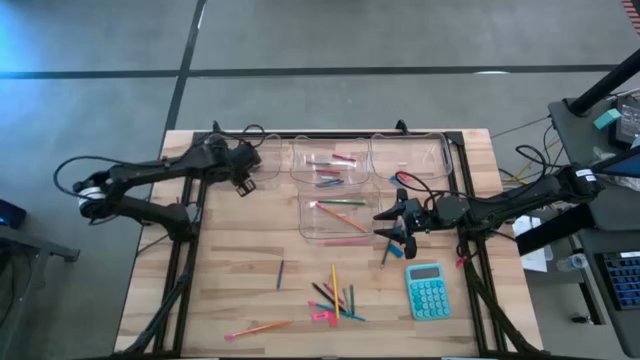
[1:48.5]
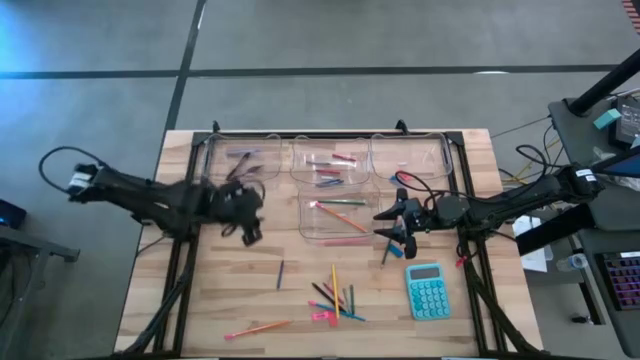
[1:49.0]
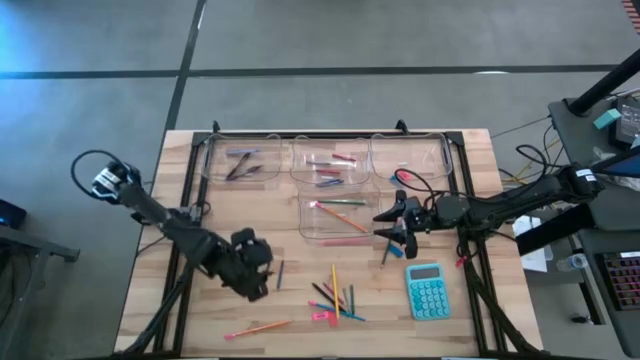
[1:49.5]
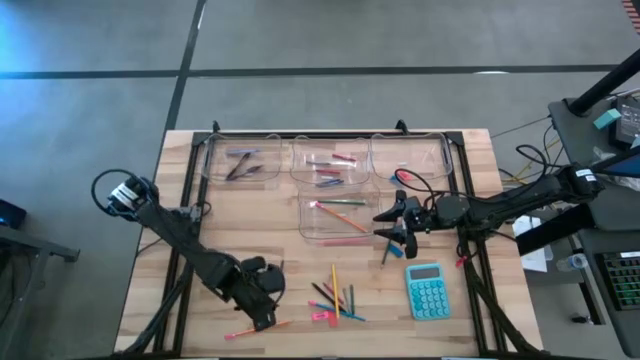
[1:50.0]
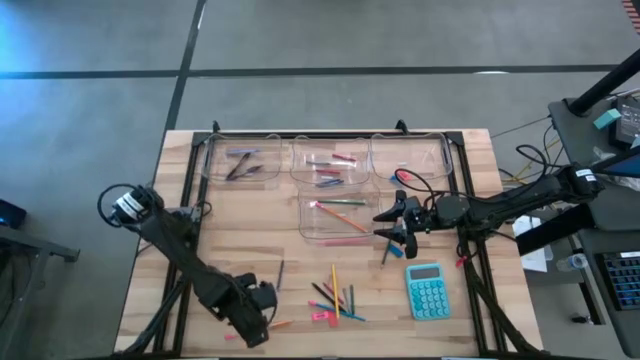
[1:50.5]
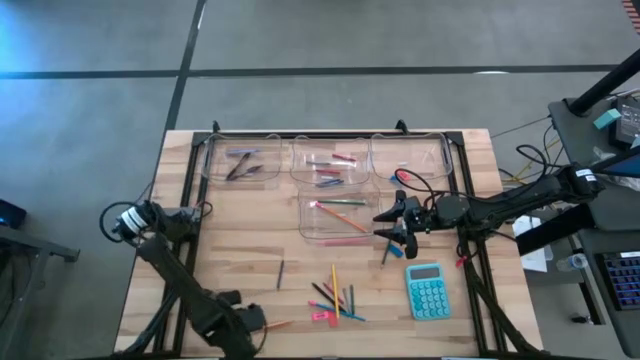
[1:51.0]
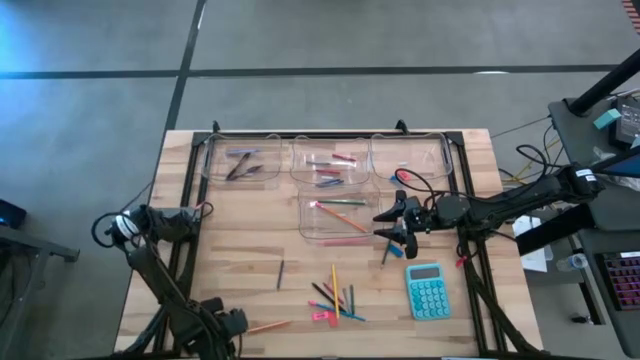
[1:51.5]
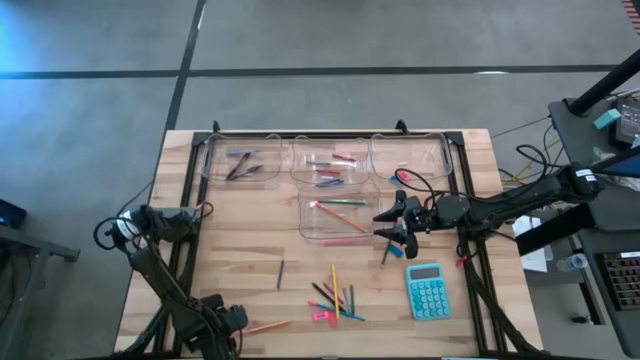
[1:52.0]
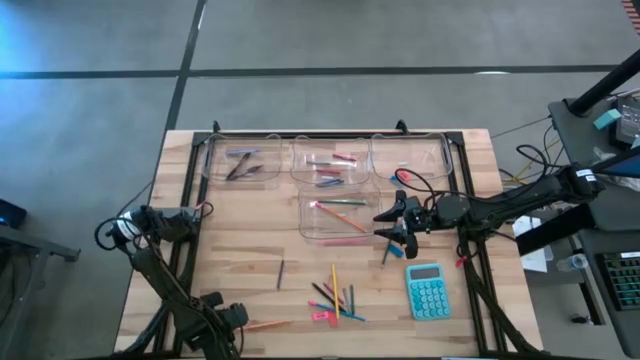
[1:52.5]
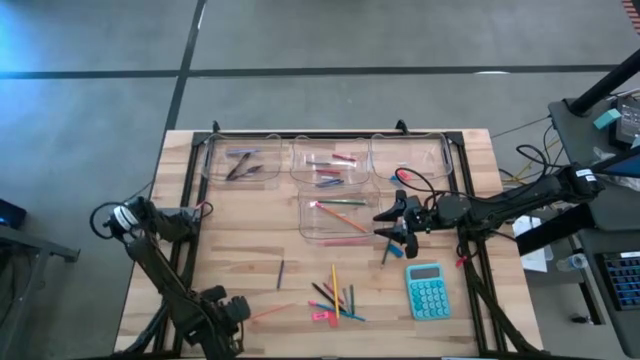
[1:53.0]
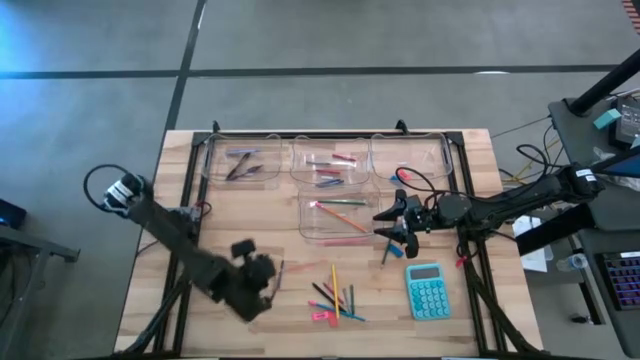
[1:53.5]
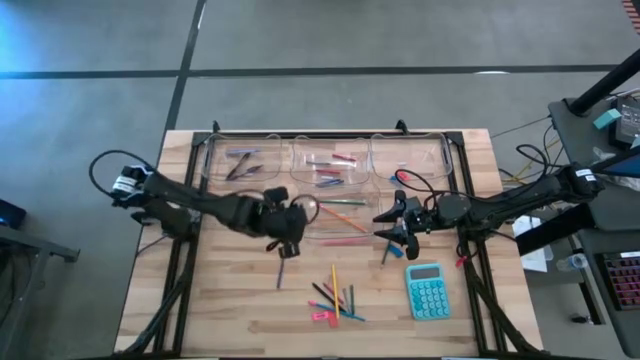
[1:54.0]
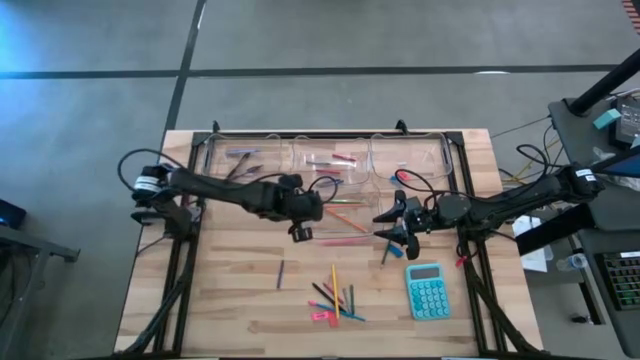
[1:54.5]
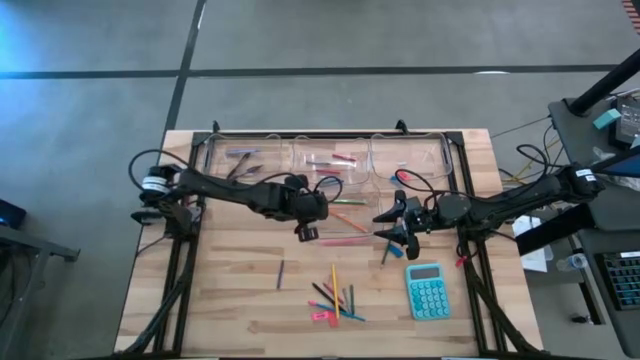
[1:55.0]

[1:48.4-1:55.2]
Task: Sort crayons/erasers/pens/pencils in bins
Put the orange pencil into the bottom transparent bin

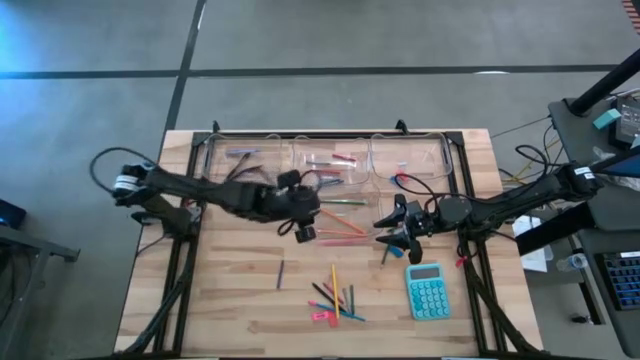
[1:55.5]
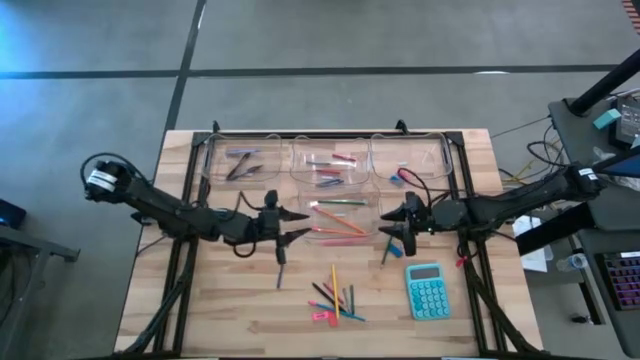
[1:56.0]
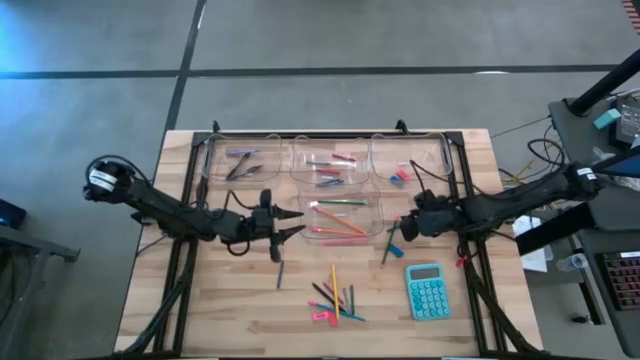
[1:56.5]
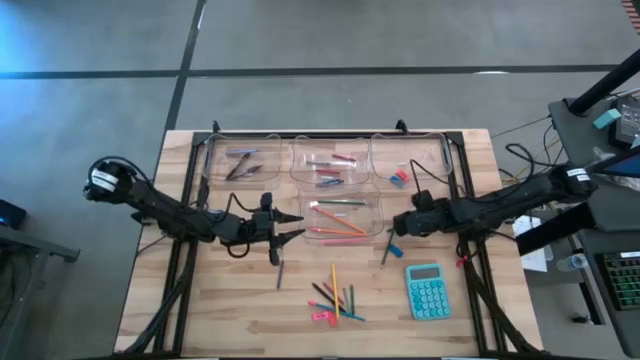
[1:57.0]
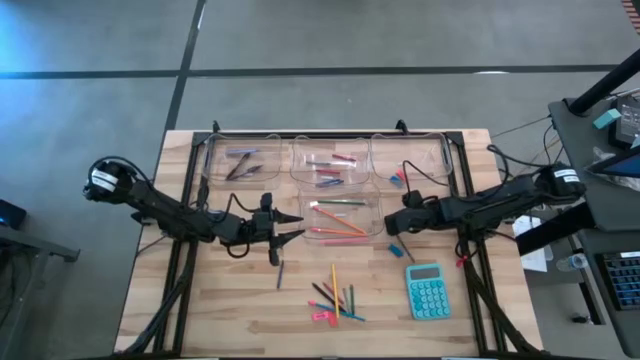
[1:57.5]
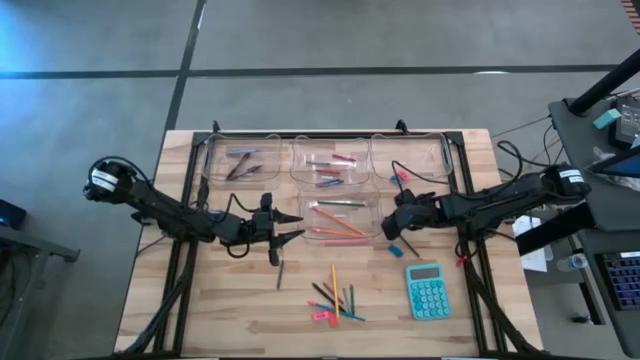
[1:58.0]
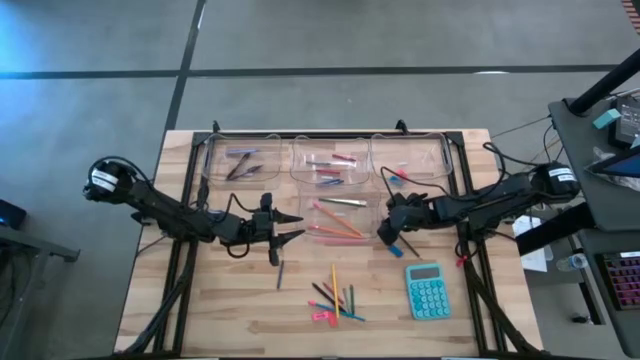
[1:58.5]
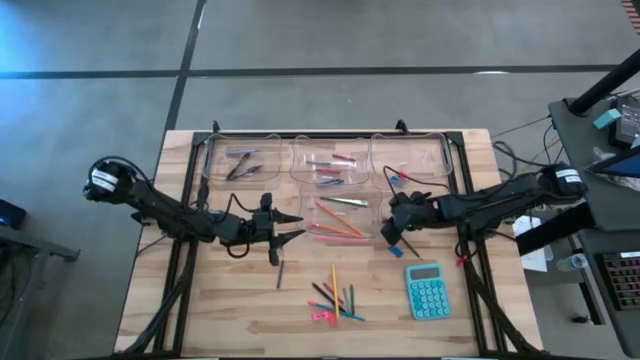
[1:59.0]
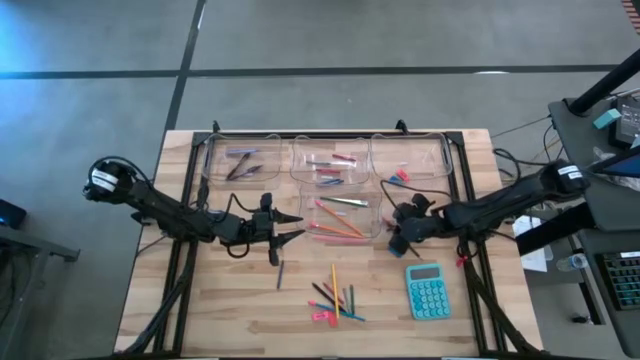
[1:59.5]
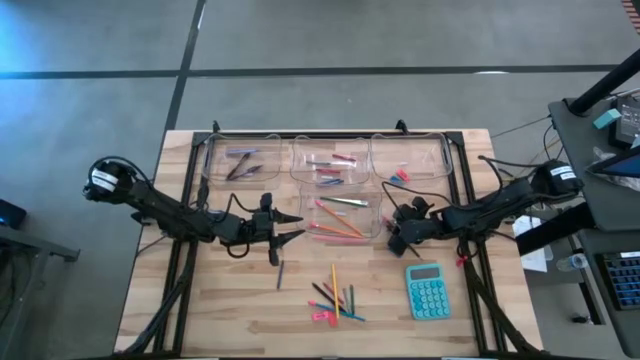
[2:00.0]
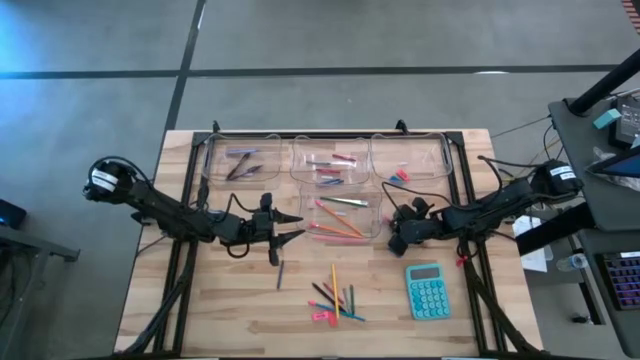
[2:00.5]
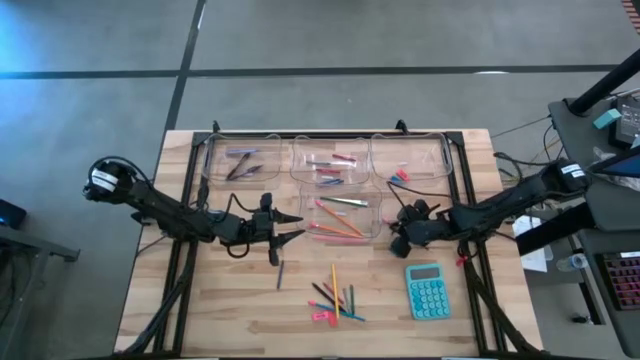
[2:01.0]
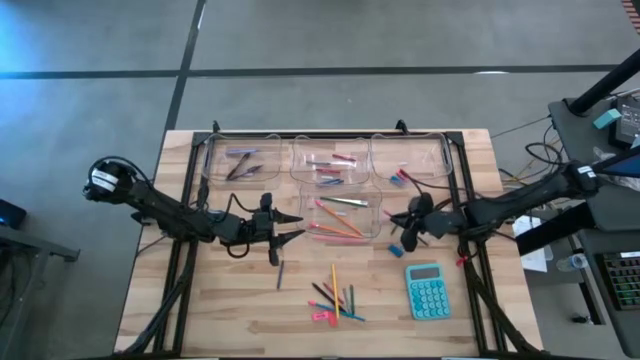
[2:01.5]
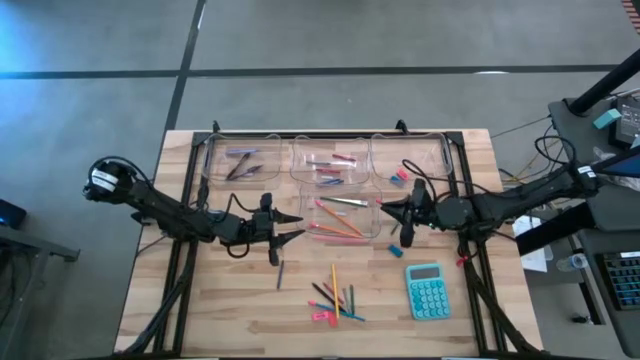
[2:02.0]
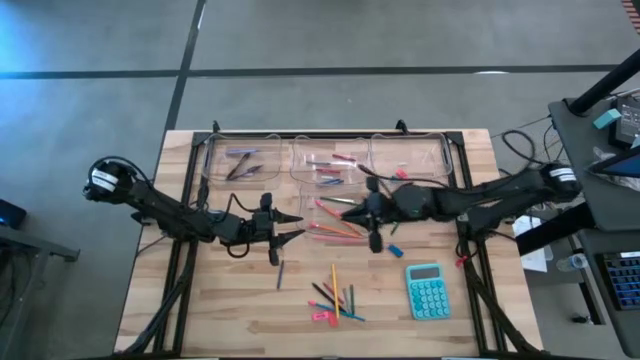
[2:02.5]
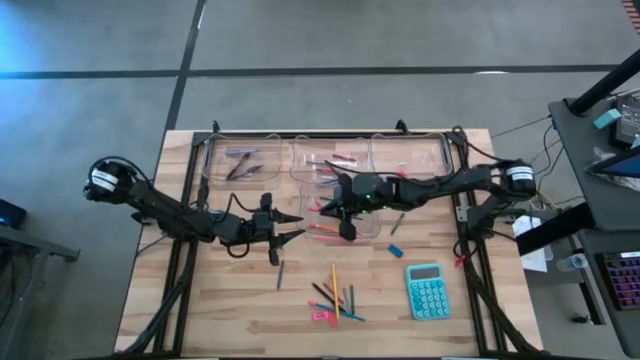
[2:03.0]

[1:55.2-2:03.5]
Put the green pencil into the bottom transparent bin

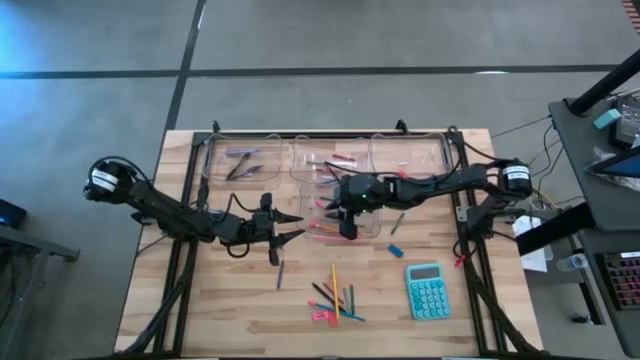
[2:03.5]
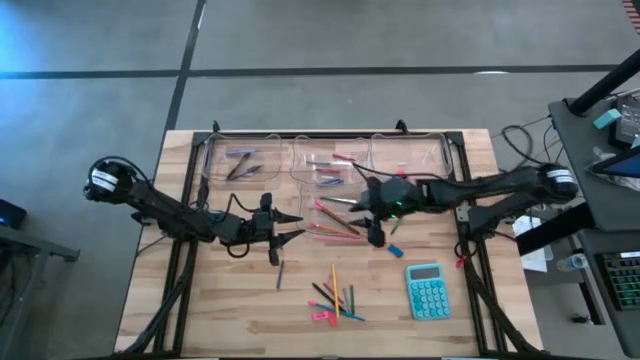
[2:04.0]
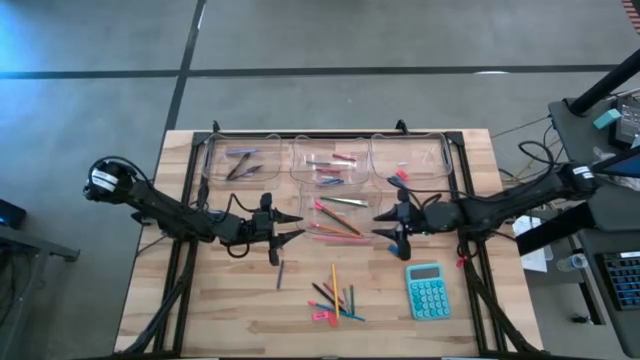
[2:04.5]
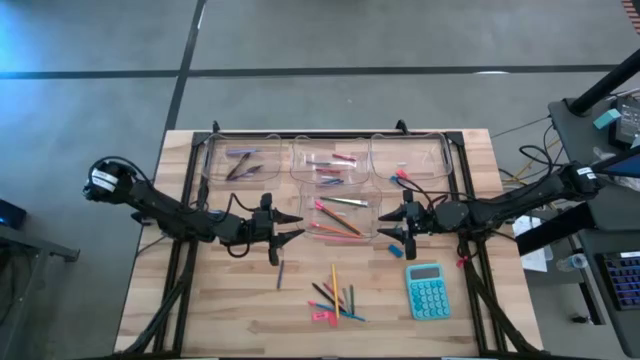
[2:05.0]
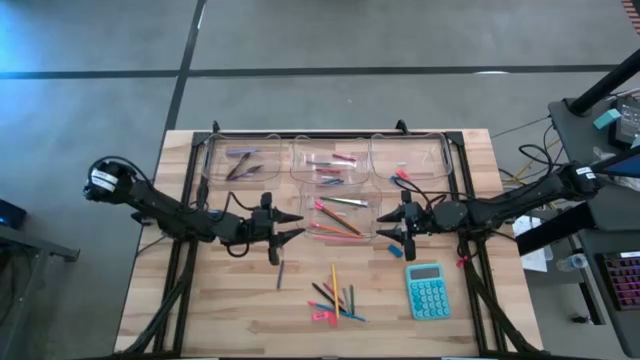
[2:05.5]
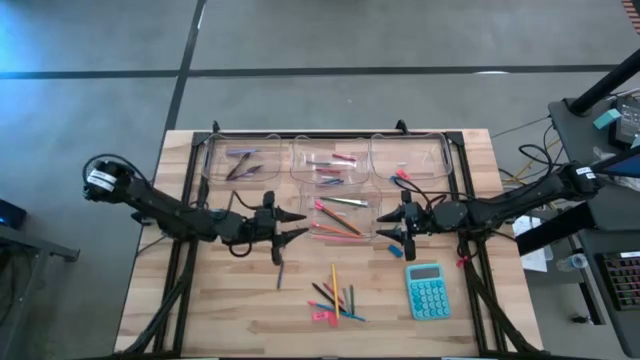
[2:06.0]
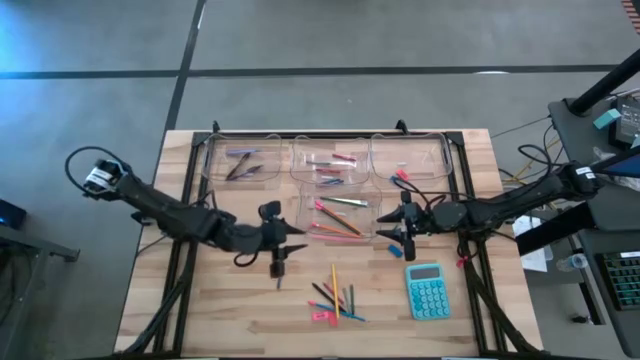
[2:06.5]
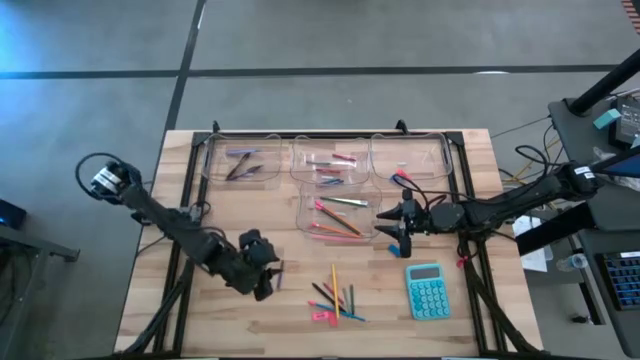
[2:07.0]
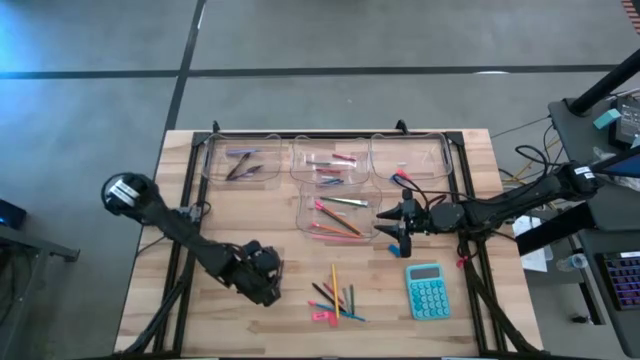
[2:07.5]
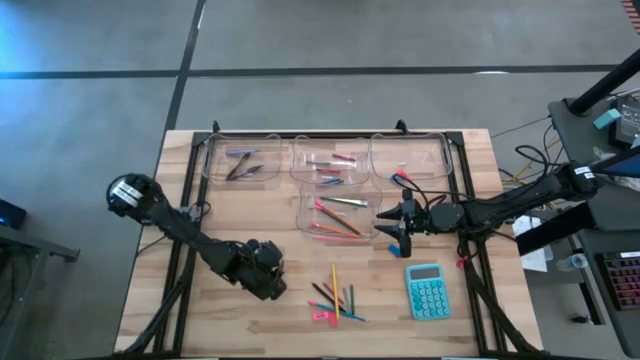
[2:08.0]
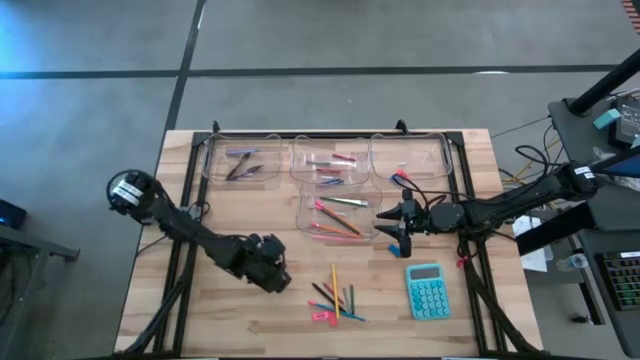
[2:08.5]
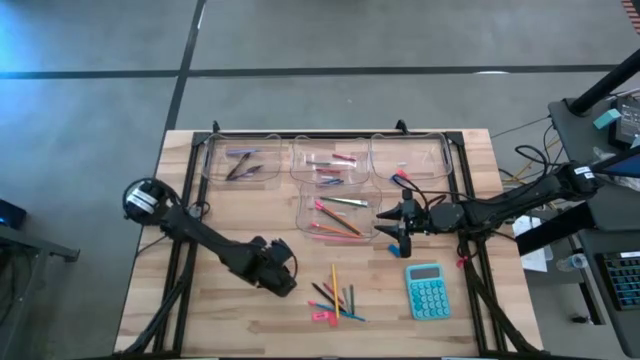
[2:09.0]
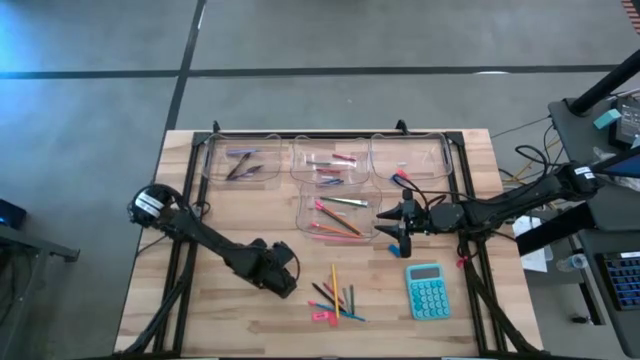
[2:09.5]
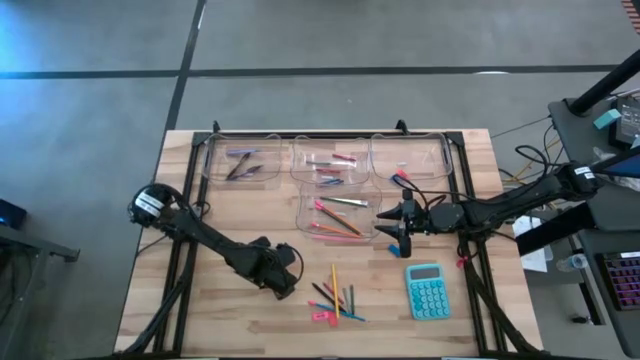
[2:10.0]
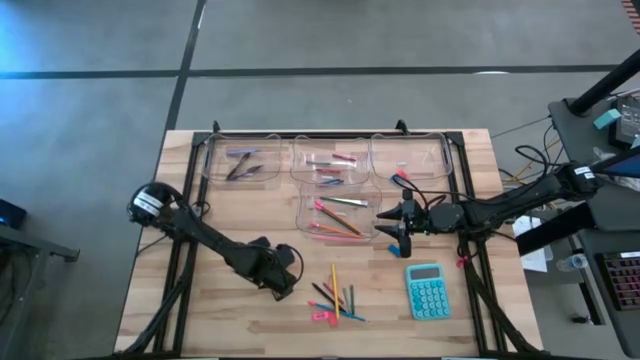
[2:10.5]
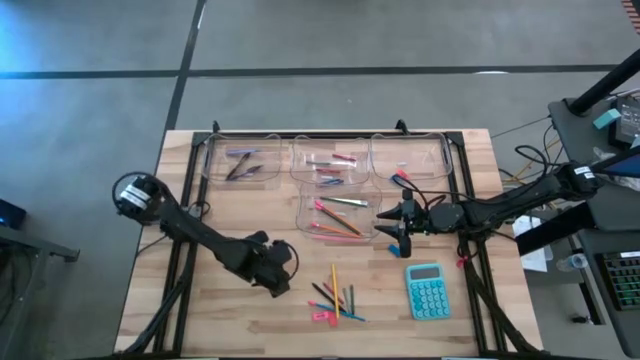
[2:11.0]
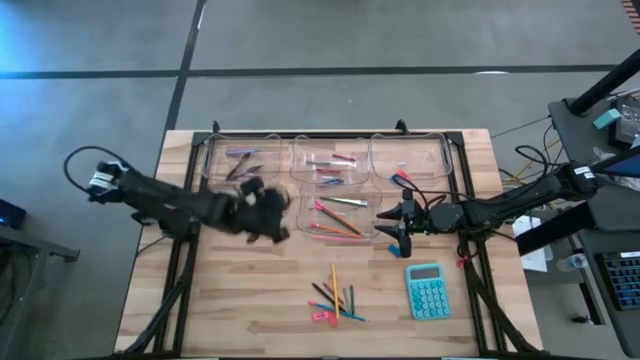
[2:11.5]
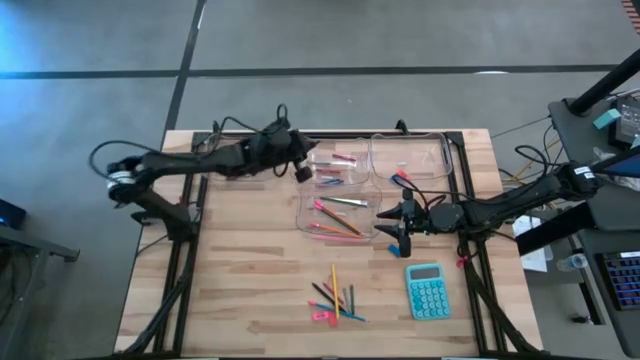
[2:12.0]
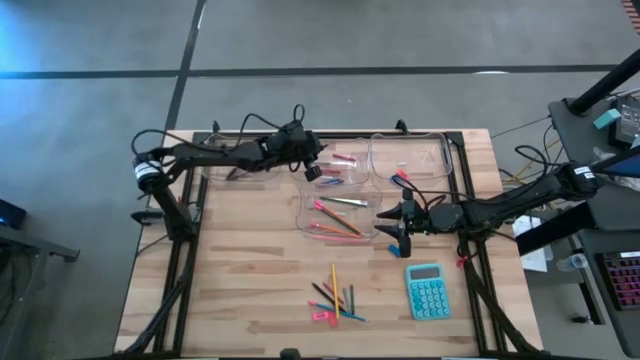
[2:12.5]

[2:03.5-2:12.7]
Put the blue crayon into the top middle transparent bin
